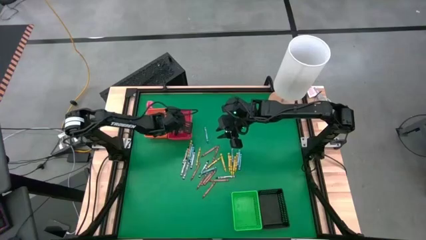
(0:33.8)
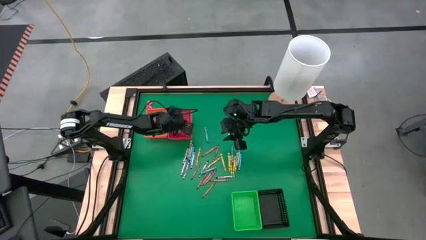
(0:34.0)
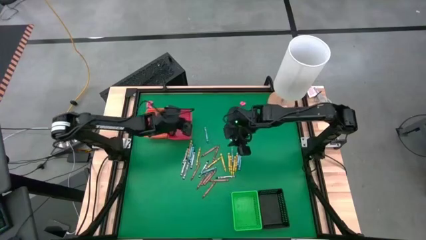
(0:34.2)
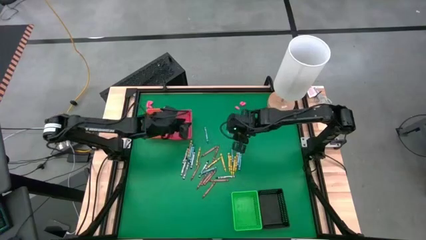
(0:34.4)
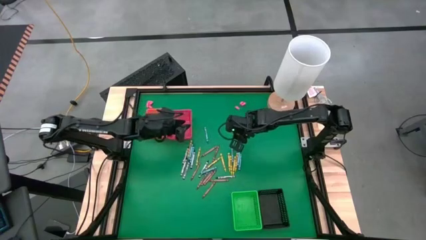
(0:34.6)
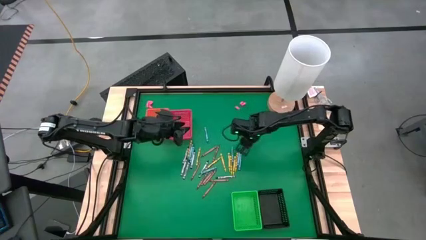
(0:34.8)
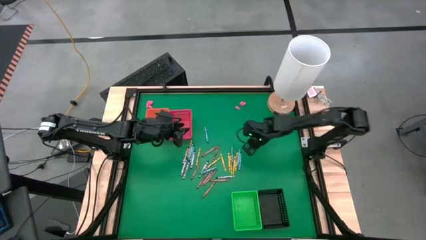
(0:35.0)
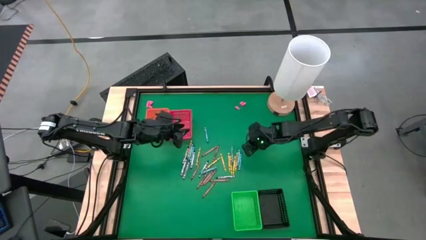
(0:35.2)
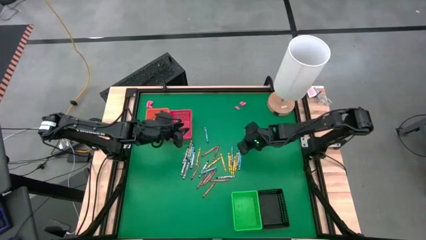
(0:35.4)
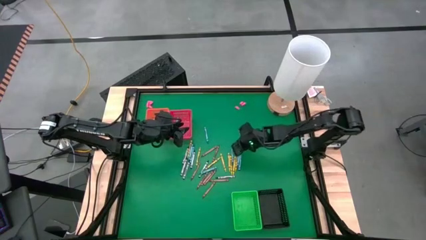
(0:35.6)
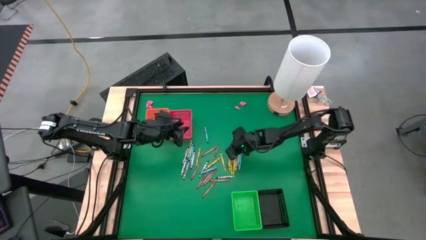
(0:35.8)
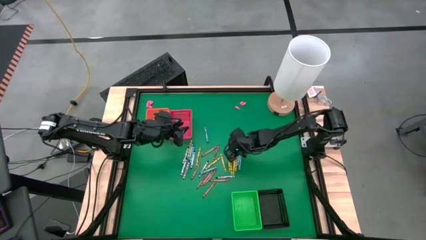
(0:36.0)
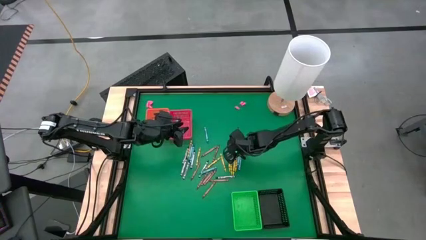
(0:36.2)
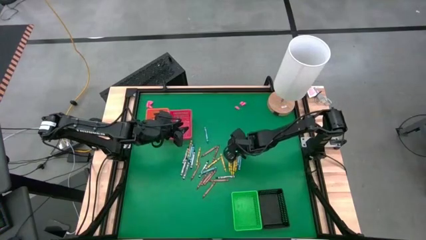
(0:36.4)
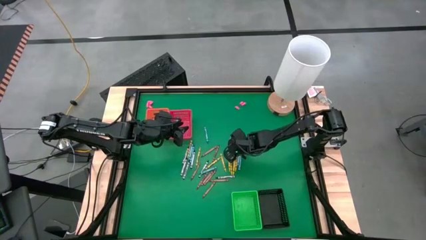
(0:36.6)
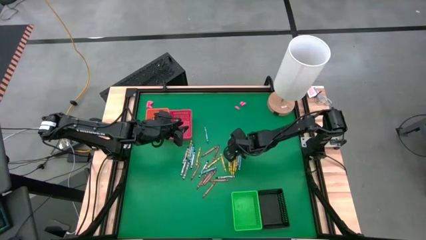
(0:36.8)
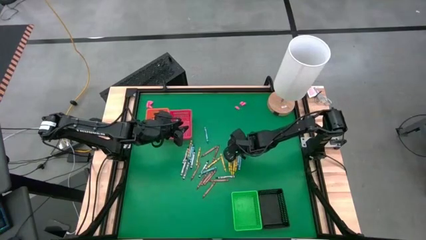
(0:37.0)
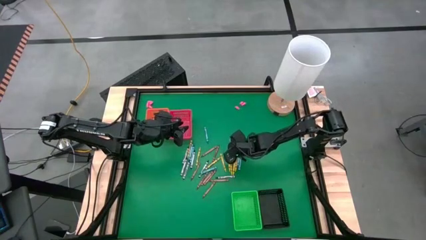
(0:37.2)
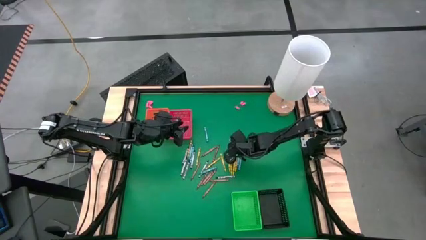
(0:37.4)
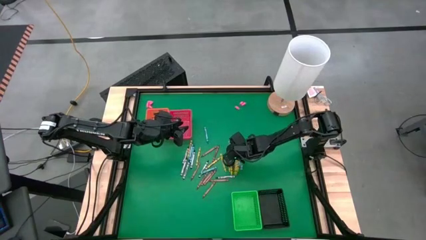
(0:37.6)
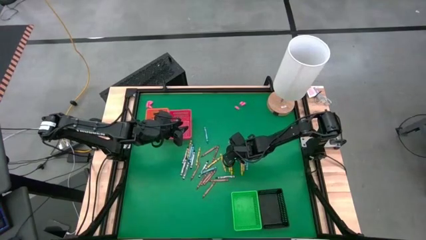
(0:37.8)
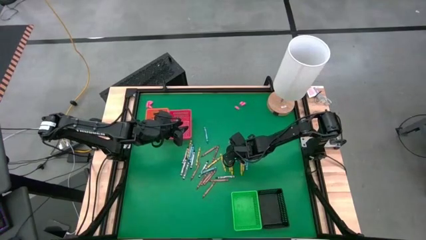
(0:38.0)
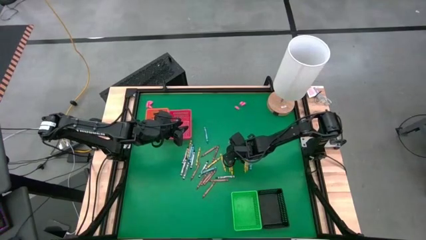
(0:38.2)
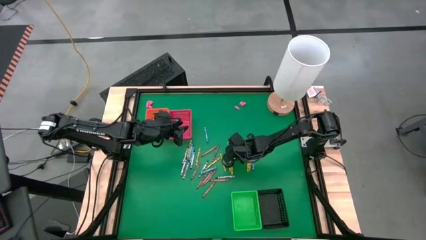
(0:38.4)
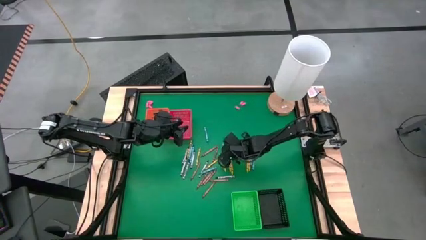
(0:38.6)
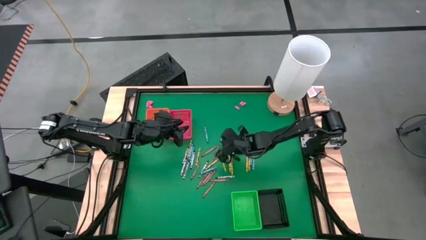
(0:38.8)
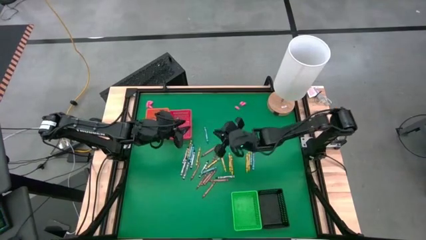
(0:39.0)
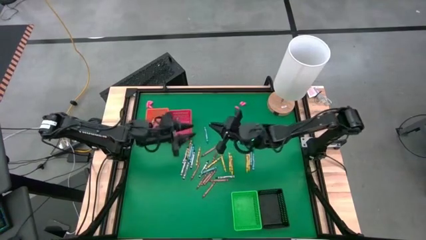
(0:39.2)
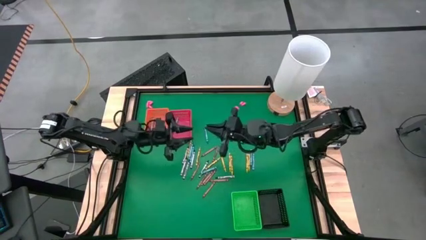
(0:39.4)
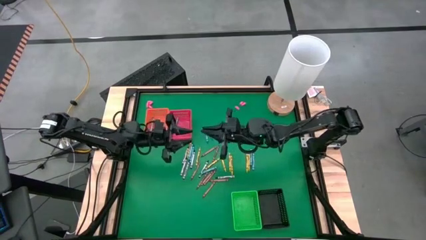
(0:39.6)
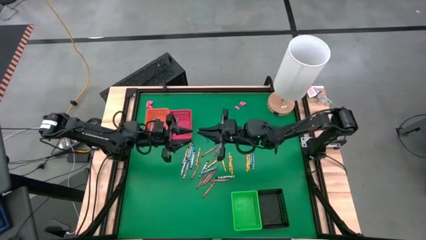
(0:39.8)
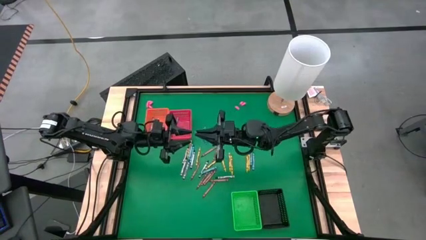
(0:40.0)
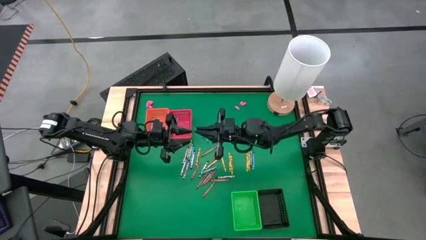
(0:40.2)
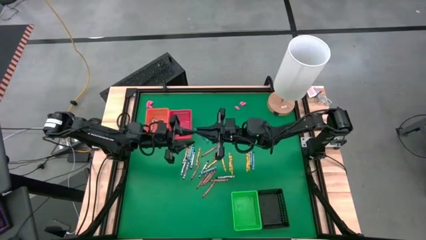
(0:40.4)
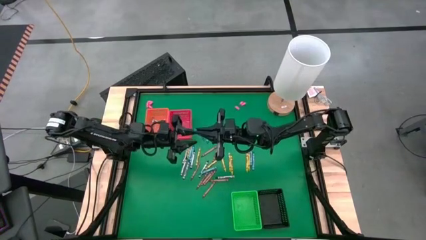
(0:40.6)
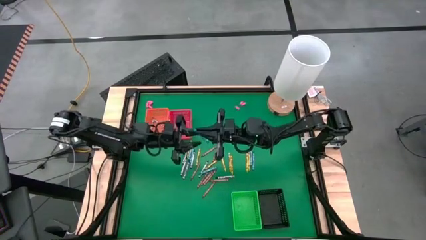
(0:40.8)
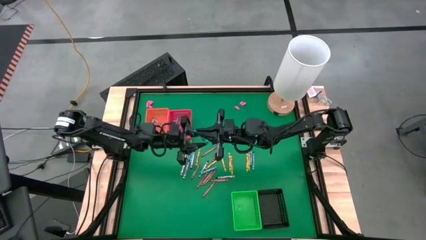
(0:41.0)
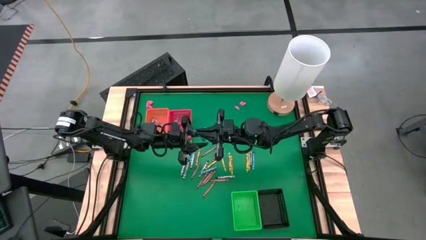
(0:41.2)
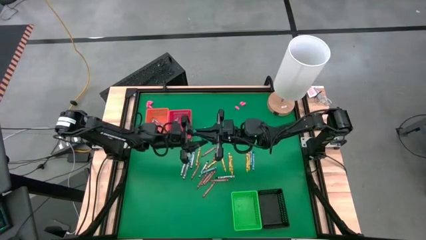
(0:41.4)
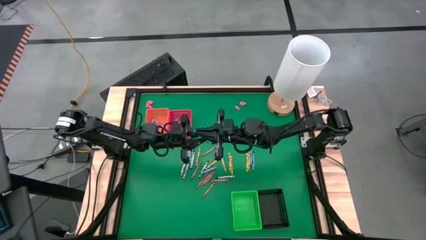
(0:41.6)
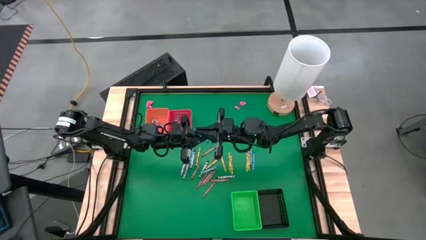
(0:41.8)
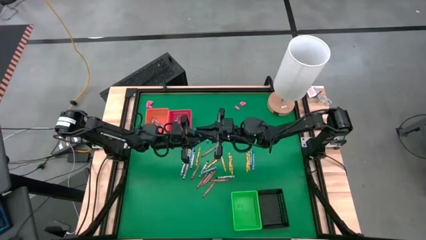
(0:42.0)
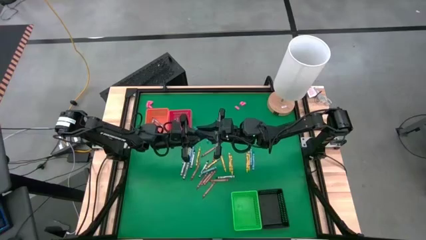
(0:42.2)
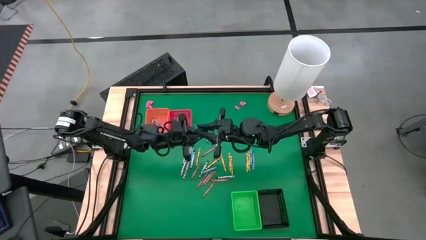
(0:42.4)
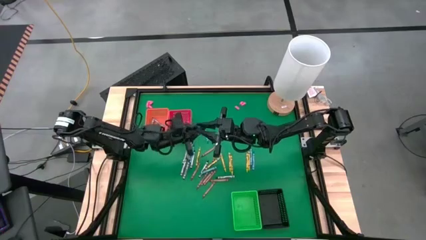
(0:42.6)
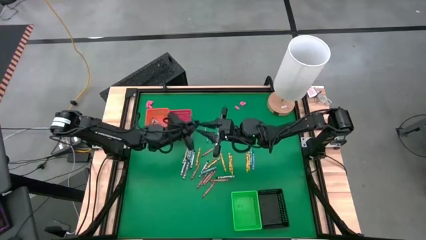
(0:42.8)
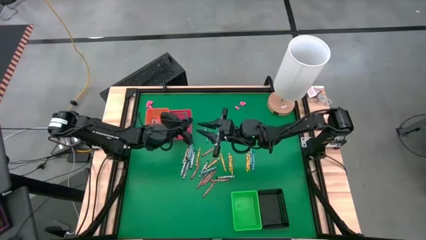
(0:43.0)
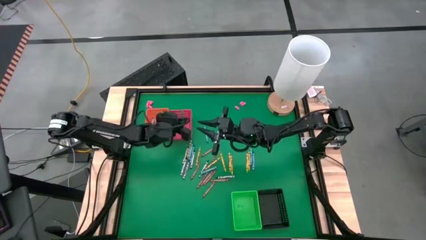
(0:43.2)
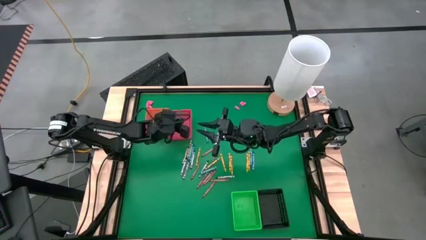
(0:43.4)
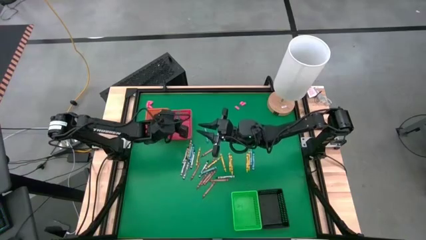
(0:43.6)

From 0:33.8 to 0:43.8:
Task: Sort crayons
Put the blue crayon into the red bin

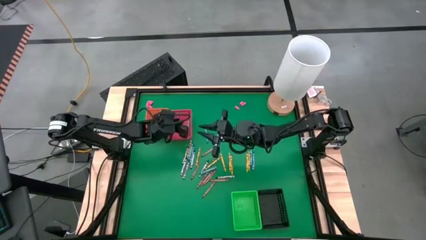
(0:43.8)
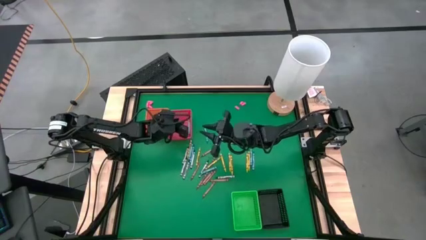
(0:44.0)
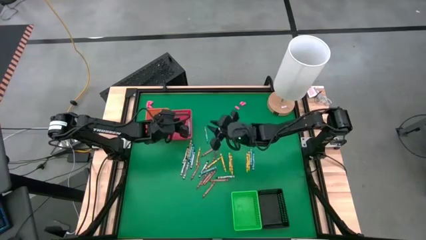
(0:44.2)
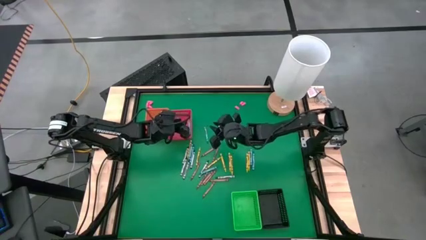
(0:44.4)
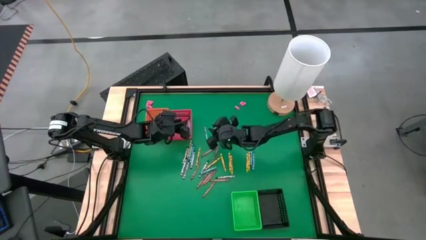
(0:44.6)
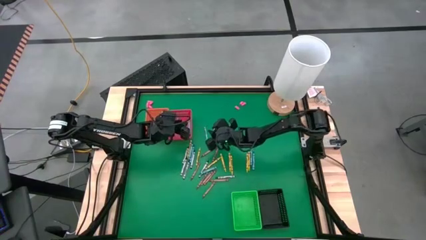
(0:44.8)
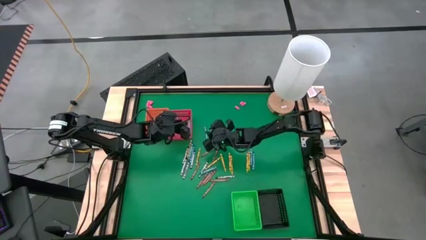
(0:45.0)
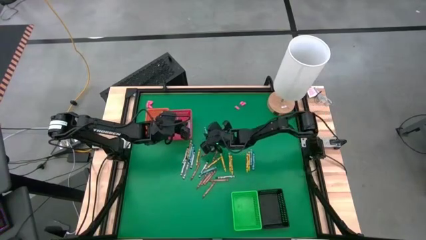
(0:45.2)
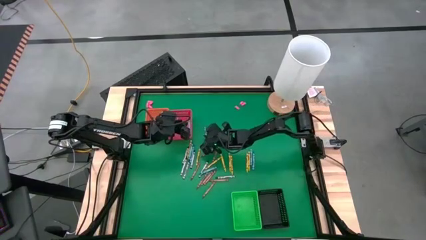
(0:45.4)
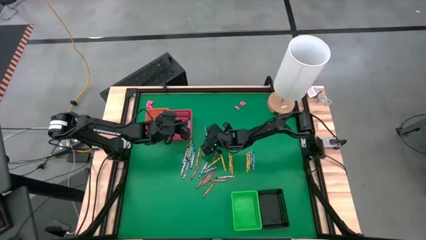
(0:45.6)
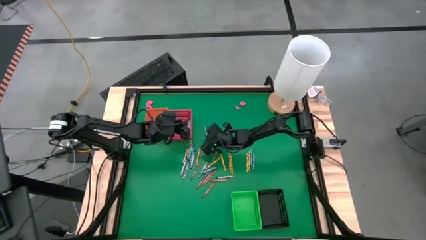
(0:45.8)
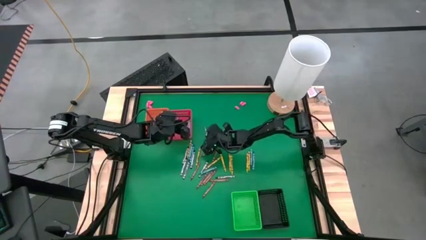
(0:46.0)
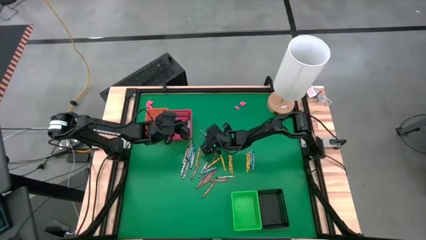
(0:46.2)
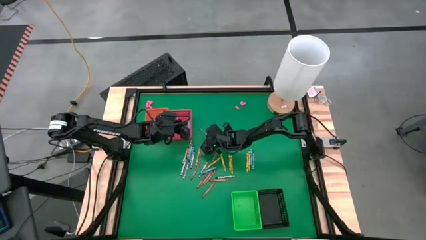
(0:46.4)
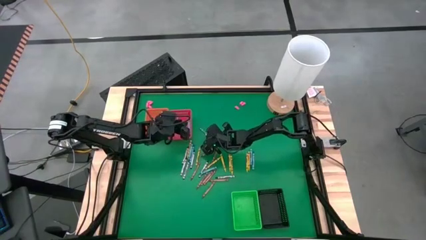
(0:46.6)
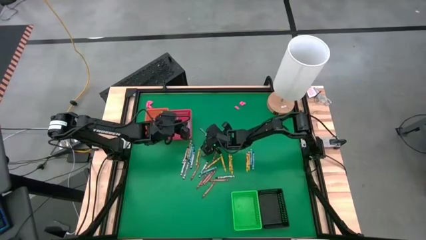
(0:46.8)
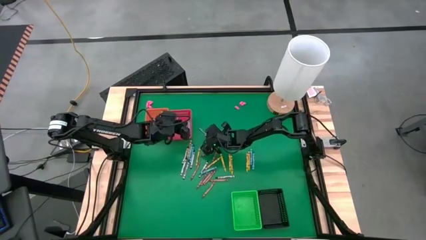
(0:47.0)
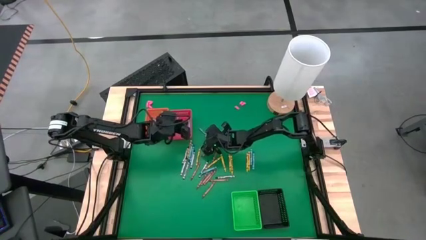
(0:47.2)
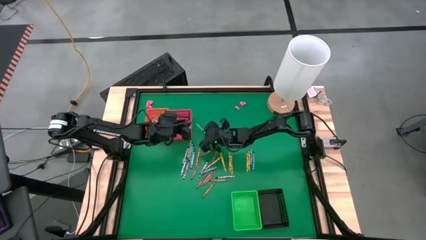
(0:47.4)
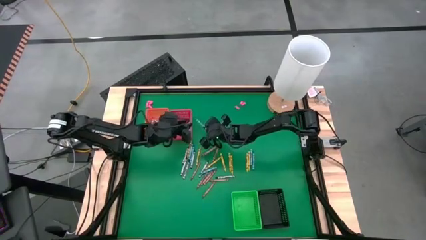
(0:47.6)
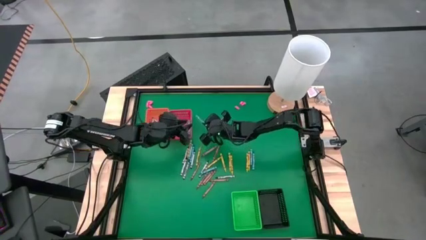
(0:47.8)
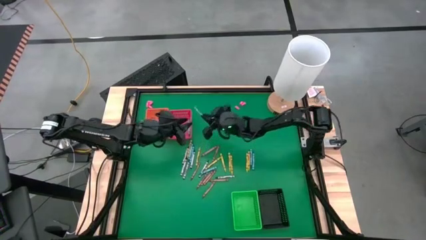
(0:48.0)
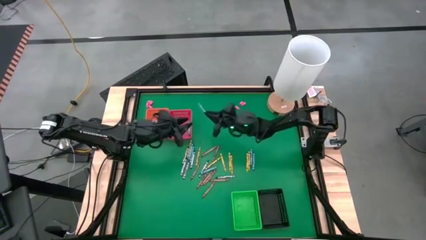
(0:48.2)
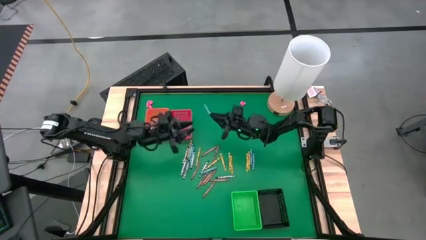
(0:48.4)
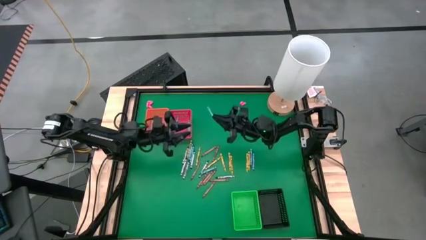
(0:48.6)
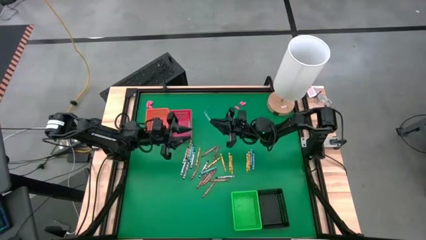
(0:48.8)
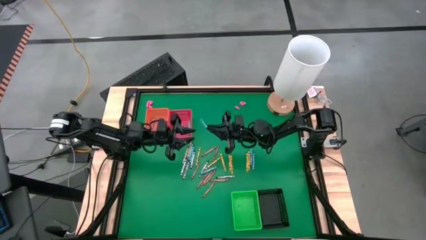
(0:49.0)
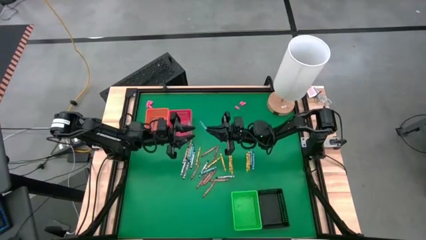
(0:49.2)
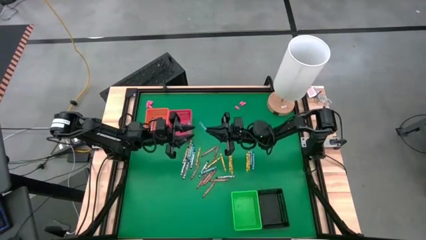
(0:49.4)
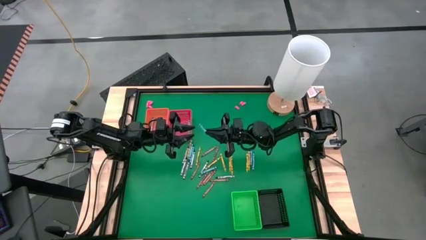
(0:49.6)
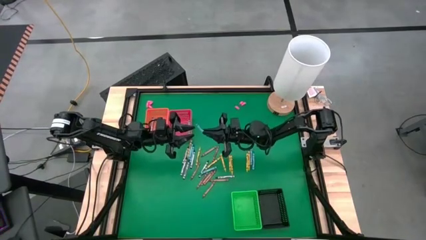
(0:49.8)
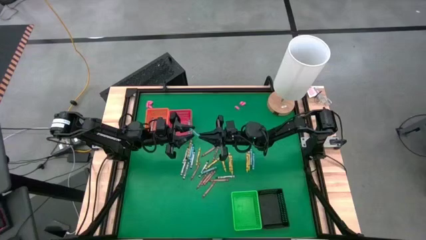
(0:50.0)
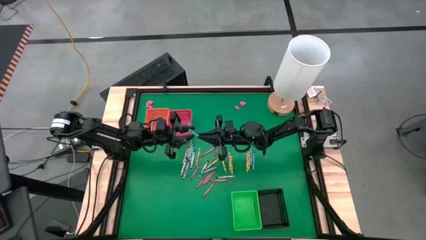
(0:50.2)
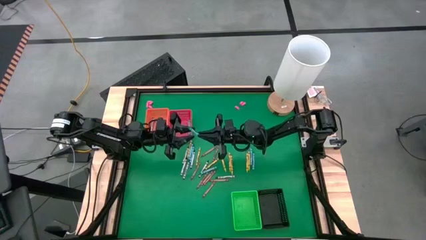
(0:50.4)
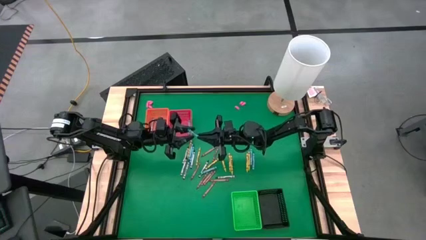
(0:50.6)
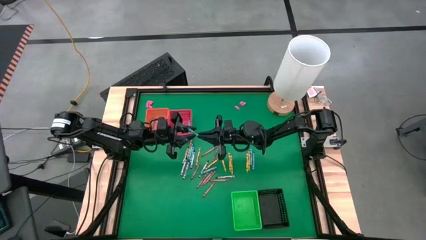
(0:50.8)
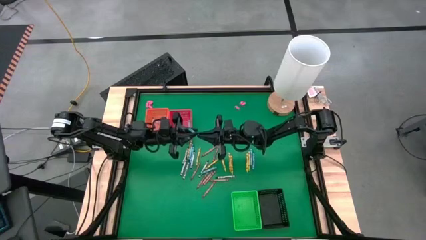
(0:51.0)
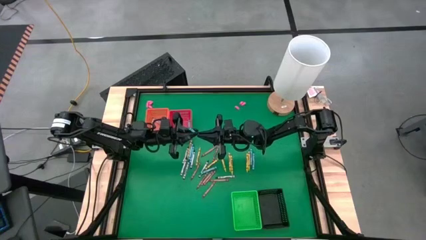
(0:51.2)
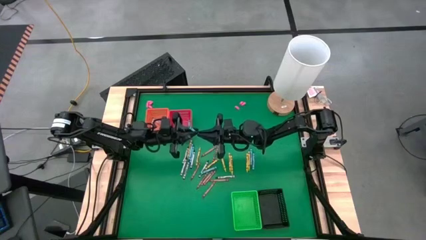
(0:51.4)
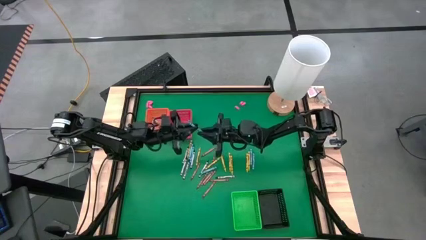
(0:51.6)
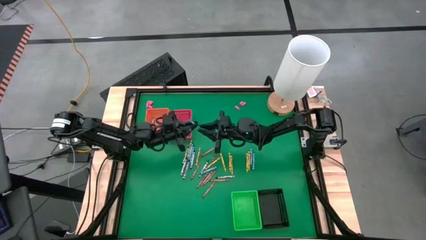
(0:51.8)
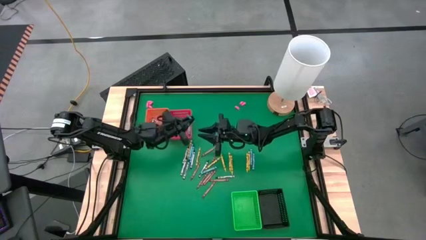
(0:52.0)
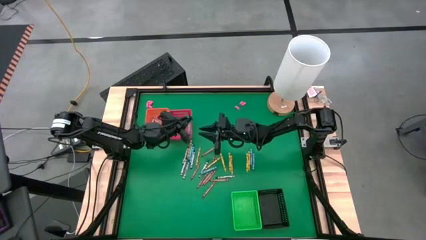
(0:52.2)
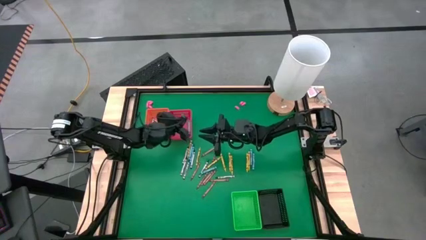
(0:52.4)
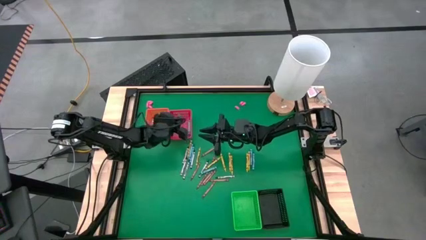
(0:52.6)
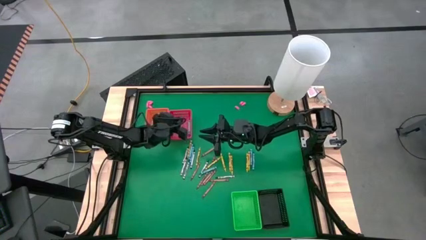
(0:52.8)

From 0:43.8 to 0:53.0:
Put the blue crayon into the red bin
